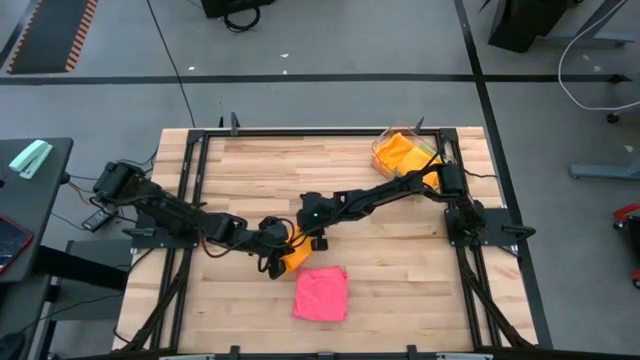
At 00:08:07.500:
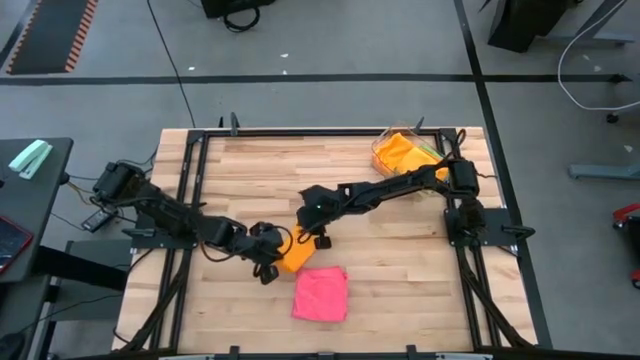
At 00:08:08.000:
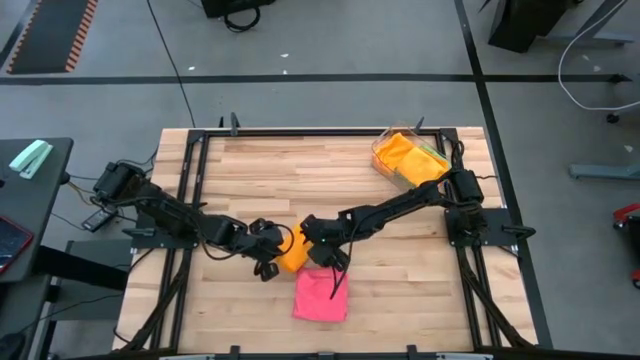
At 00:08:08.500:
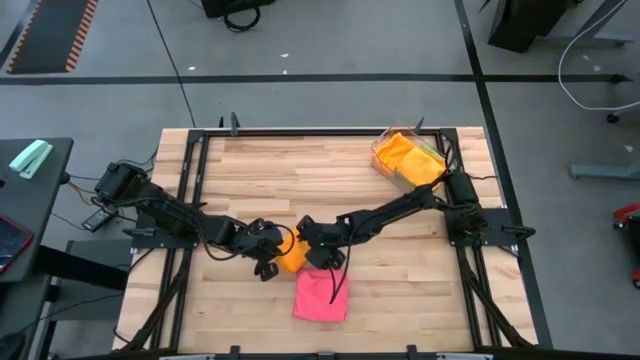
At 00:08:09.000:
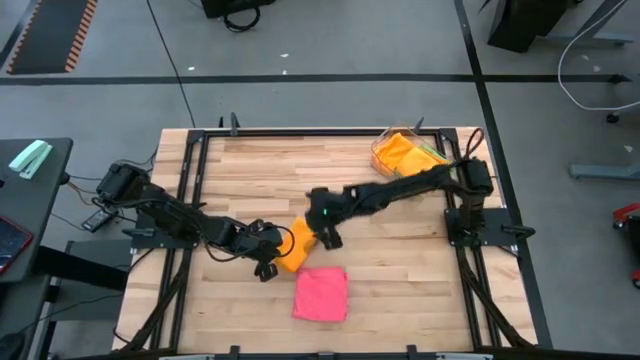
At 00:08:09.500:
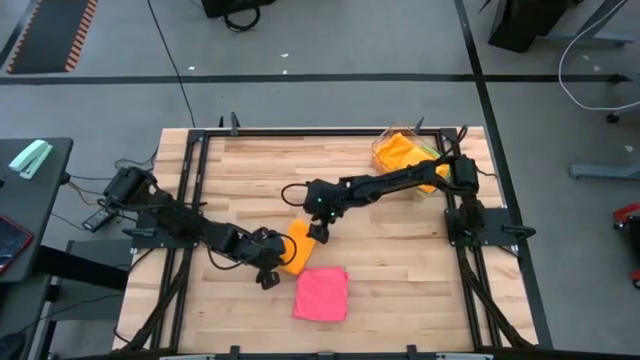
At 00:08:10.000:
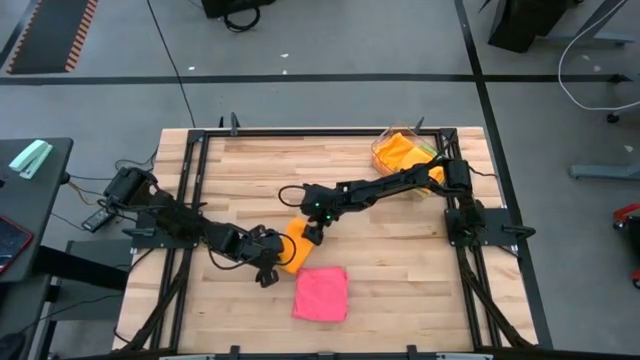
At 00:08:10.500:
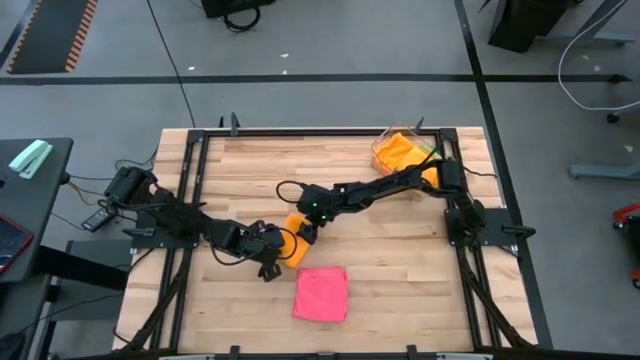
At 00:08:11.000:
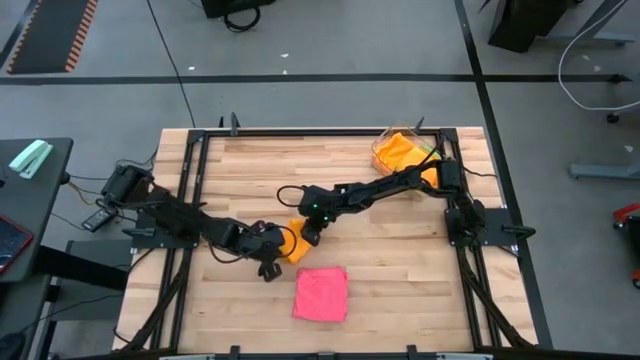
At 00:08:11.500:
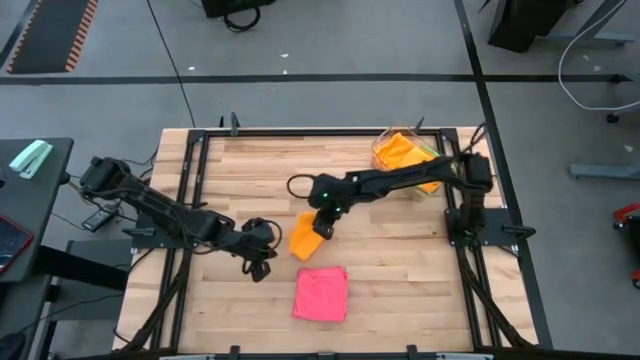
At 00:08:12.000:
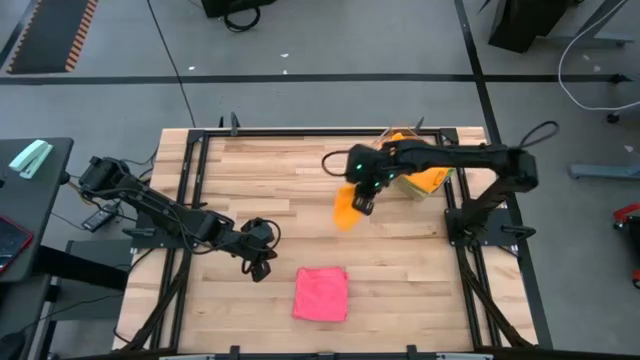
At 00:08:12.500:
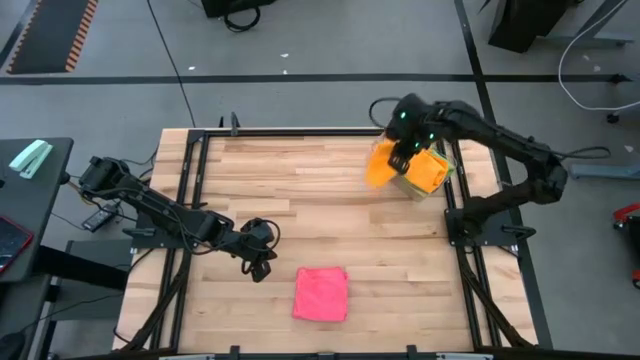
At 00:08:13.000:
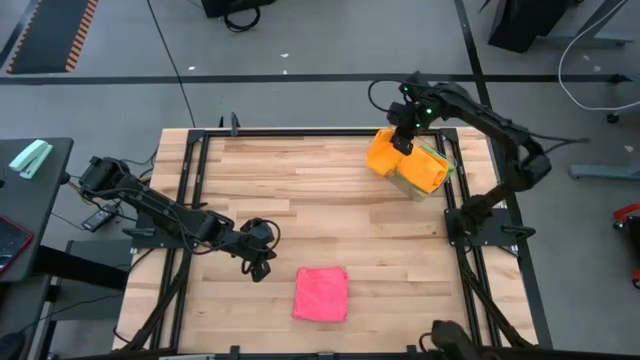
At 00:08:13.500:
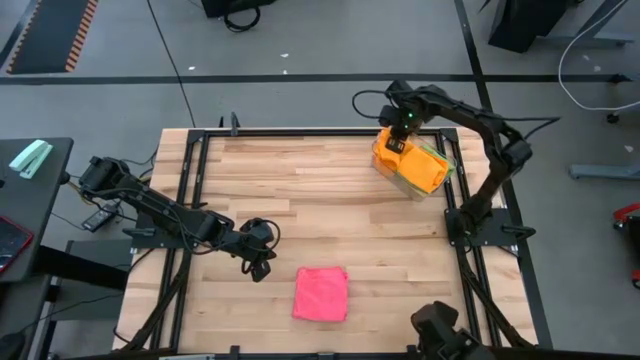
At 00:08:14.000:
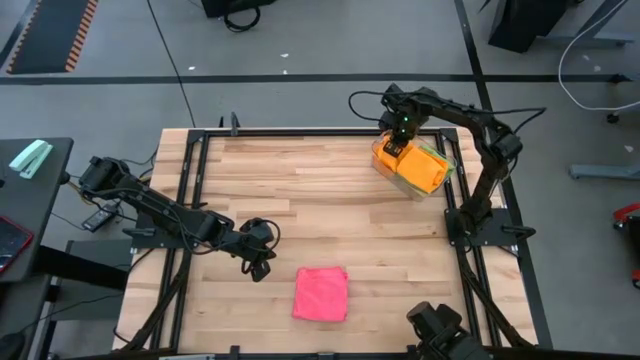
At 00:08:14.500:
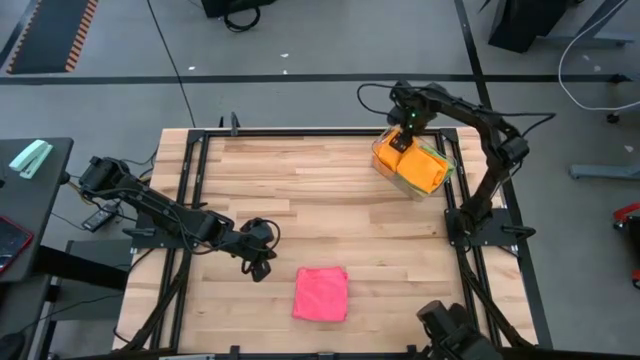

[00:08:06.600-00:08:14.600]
Task: Fold microfiber towels
Put the orange towel into the transparent bin

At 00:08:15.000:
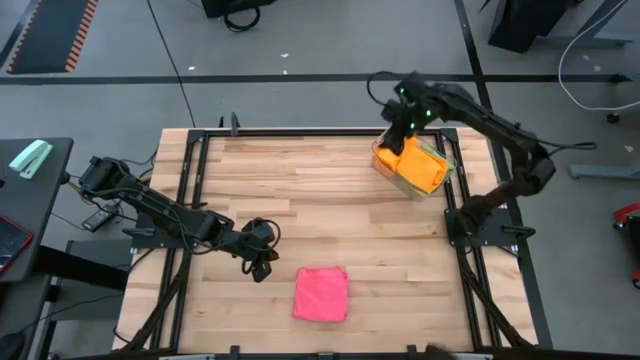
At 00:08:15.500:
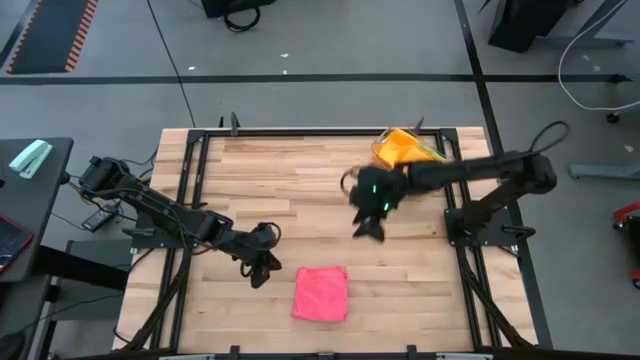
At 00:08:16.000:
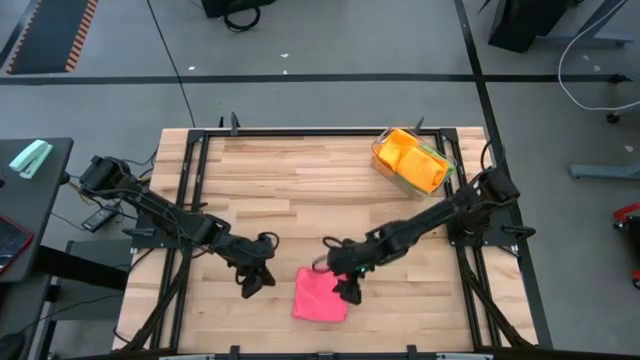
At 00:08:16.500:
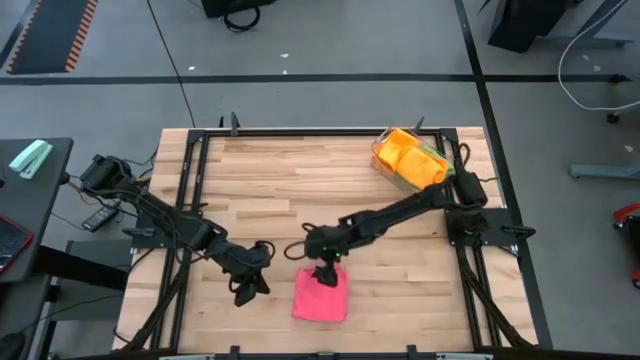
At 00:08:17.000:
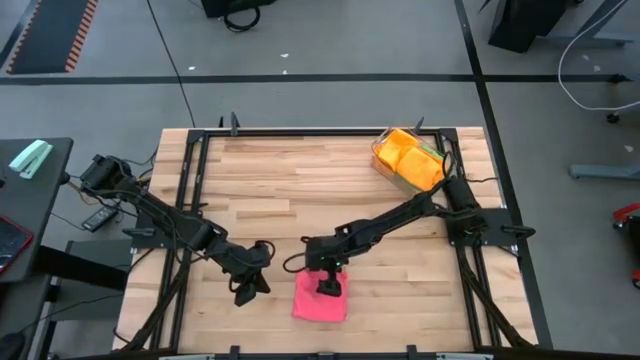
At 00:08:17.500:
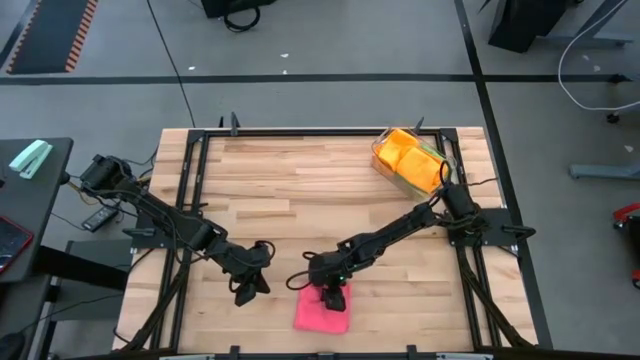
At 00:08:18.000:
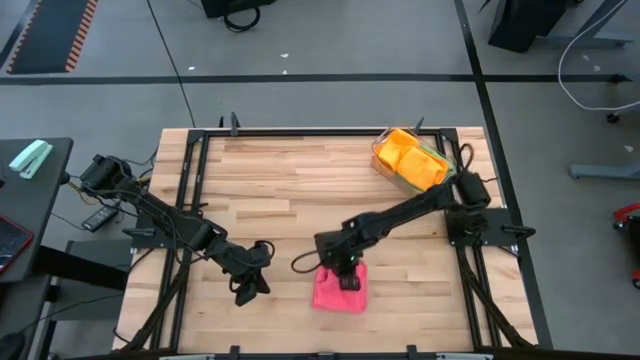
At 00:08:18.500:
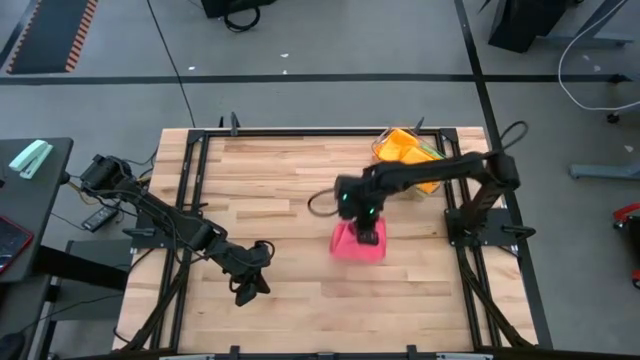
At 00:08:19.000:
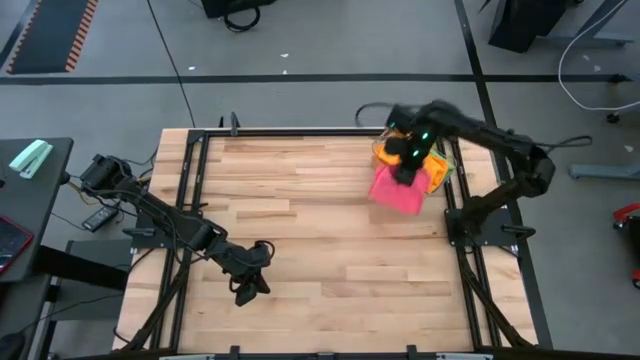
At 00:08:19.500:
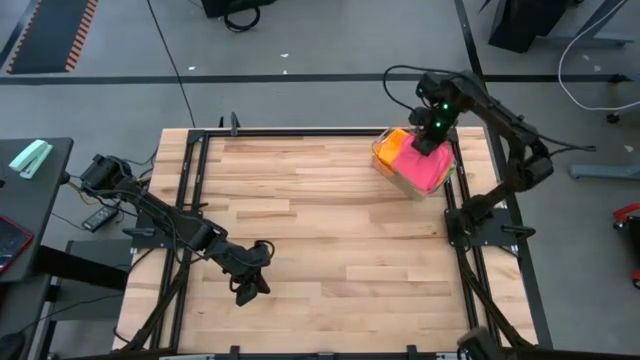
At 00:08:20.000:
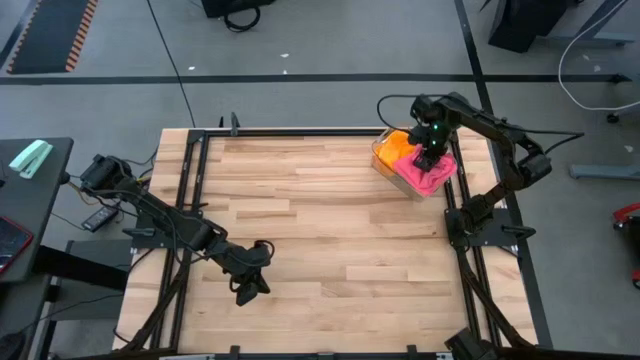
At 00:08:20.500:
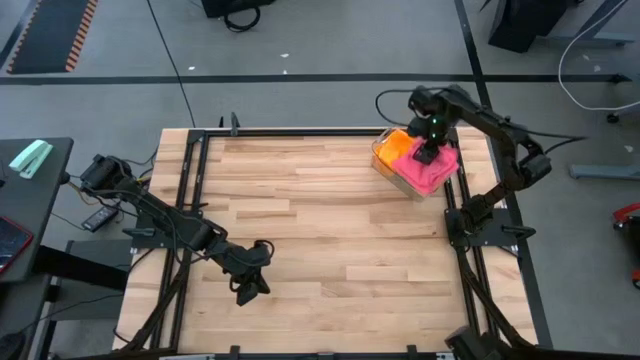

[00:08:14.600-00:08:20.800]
Put the stacked pink towels into the transparent bin

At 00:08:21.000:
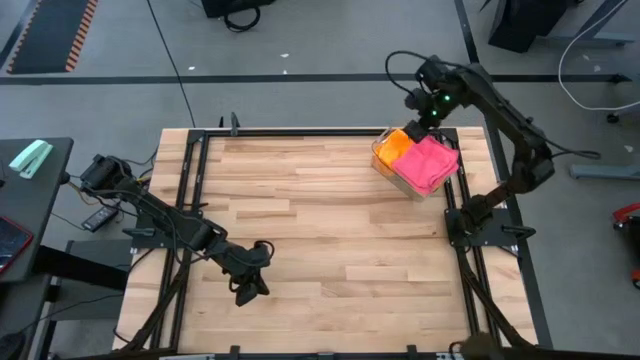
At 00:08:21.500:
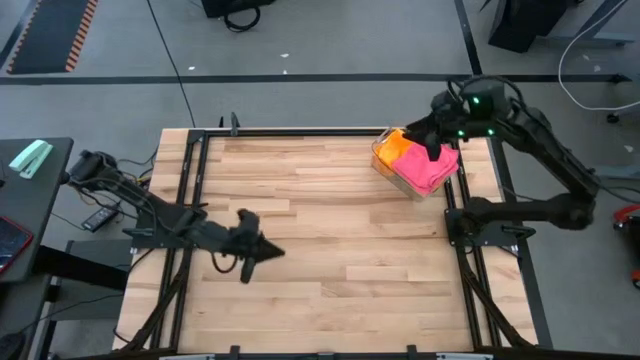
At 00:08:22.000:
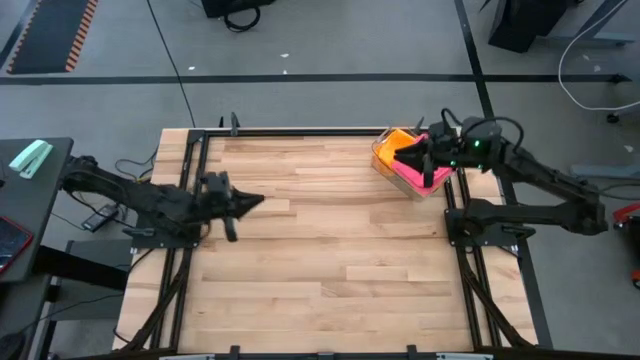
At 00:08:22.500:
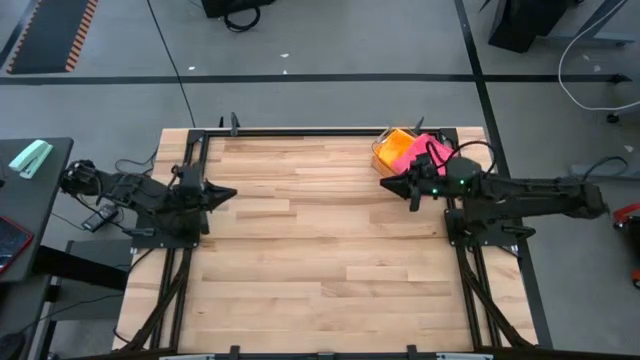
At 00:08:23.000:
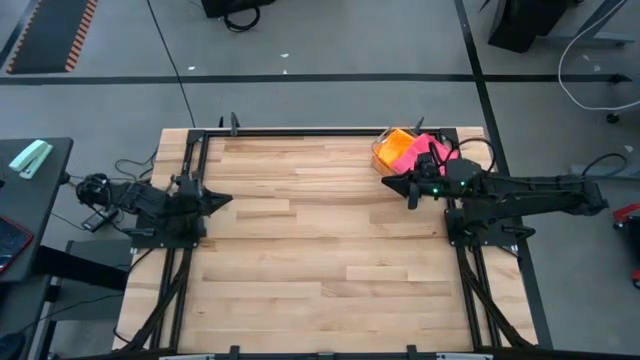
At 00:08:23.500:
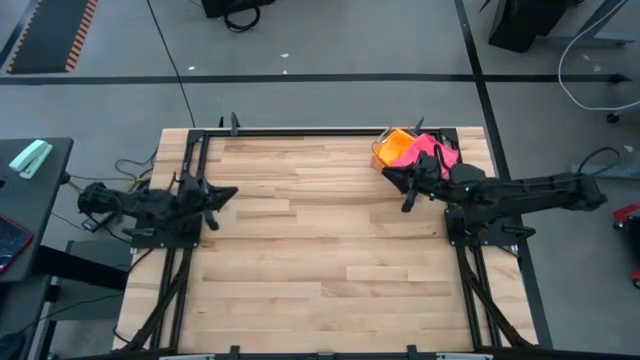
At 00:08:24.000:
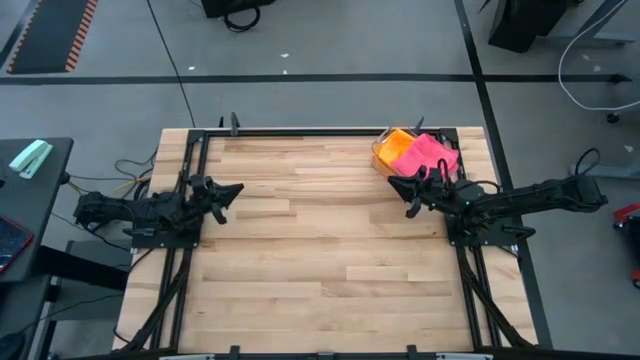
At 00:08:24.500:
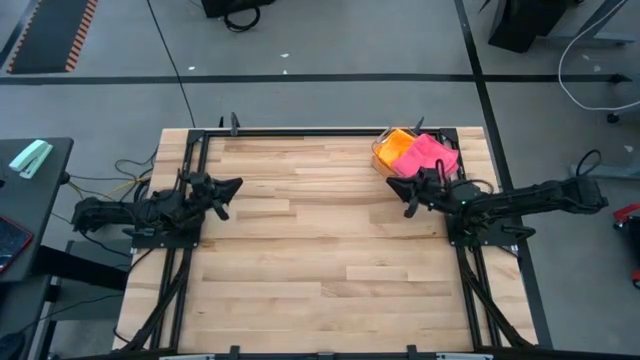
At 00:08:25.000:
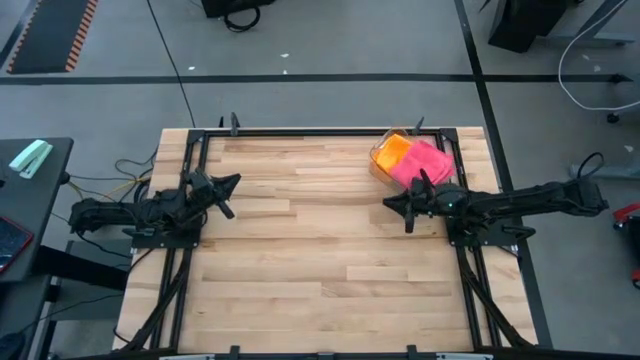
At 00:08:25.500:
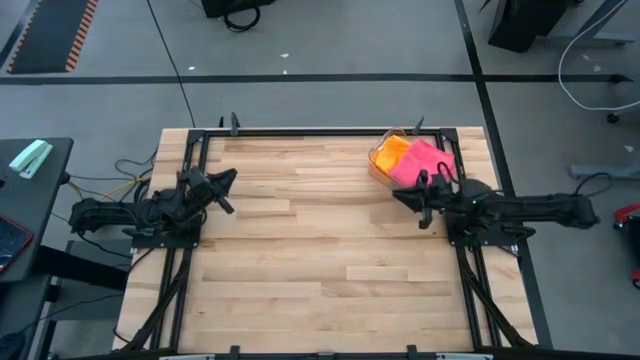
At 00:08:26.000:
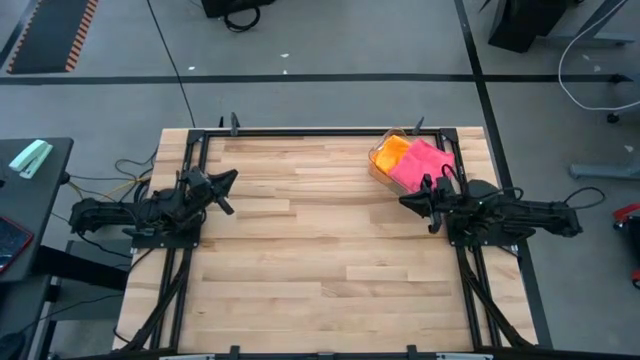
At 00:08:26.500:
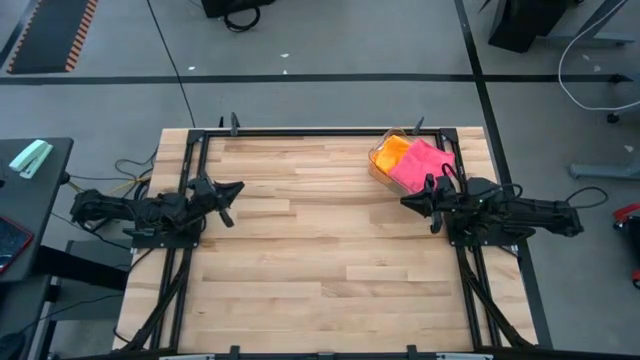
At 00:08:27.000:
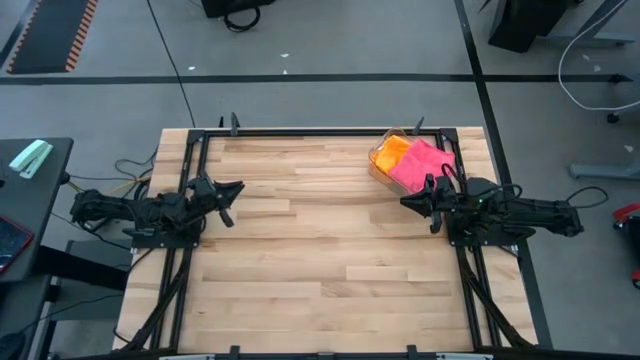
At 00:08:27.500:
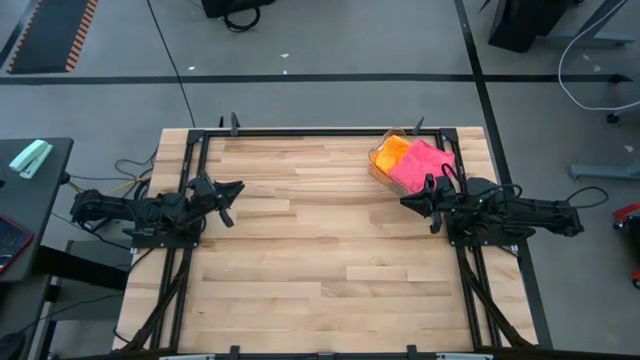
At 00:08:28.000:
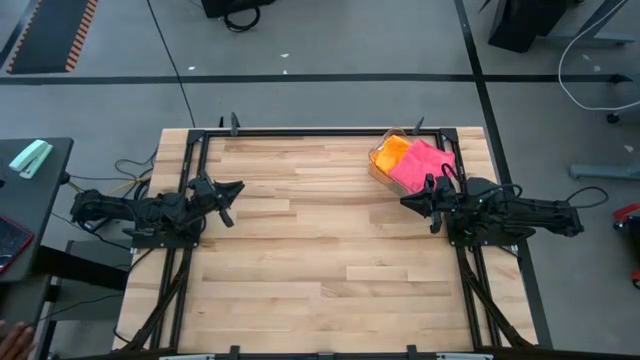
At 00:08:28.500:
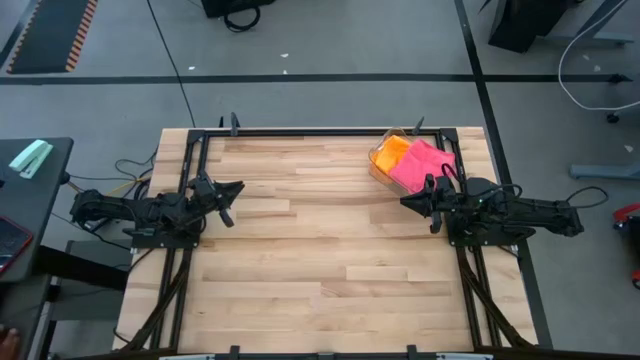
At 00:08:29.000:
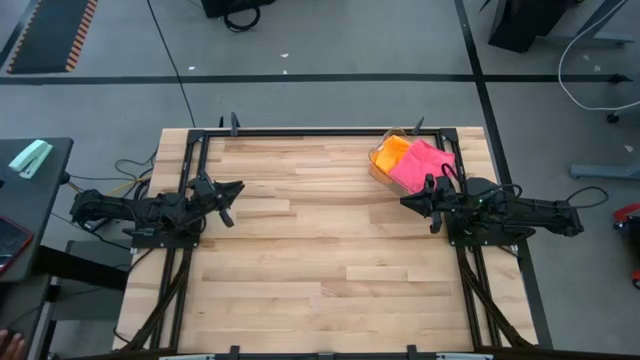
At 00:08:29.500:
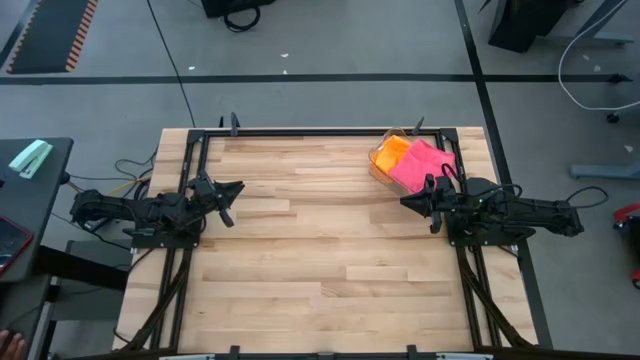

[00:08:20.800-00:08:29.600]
Return to Home Position
